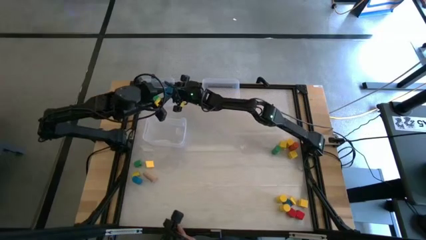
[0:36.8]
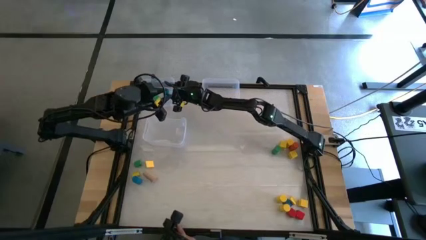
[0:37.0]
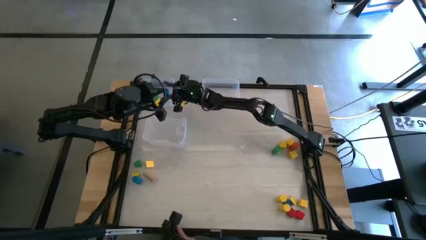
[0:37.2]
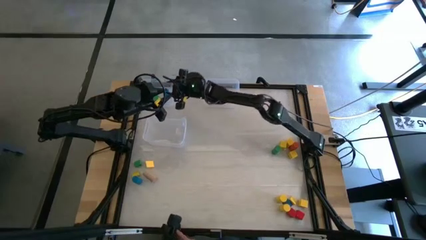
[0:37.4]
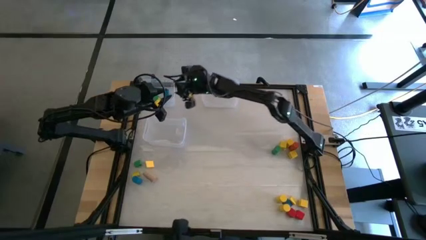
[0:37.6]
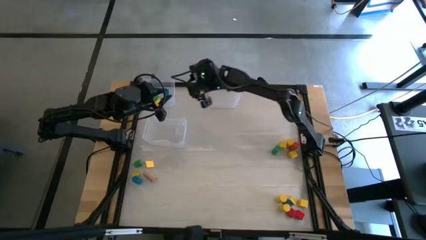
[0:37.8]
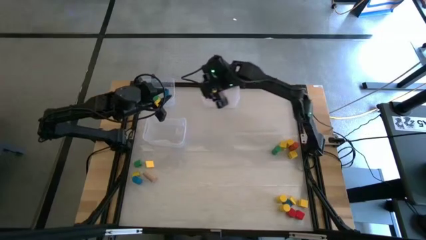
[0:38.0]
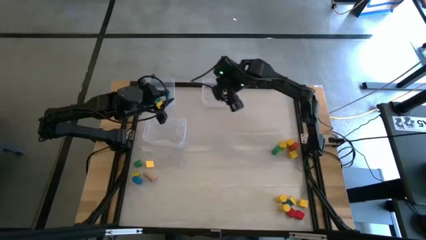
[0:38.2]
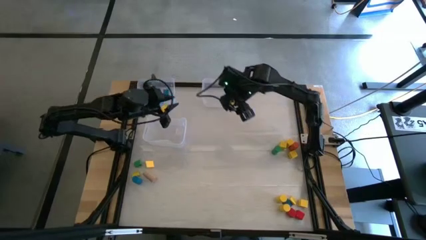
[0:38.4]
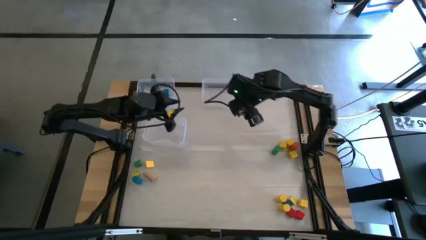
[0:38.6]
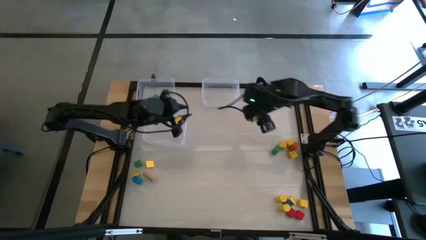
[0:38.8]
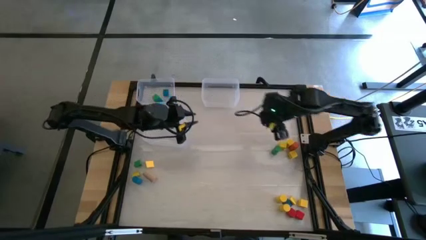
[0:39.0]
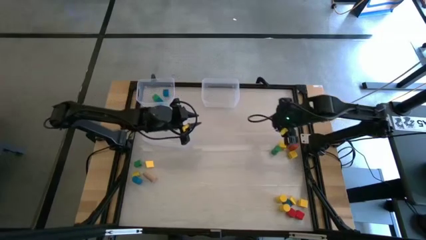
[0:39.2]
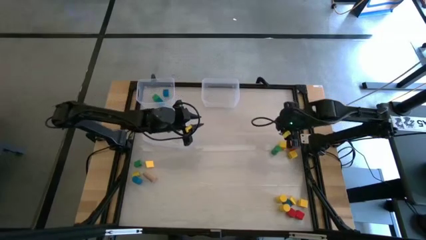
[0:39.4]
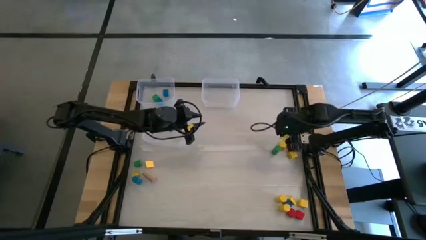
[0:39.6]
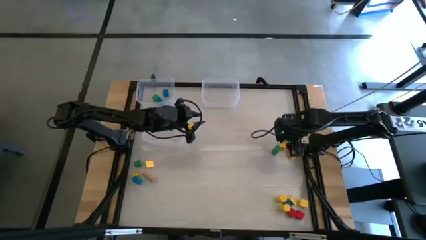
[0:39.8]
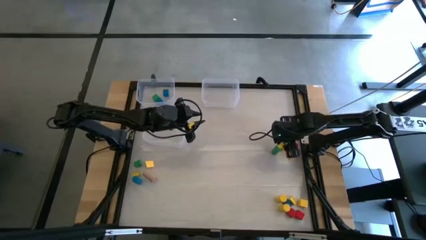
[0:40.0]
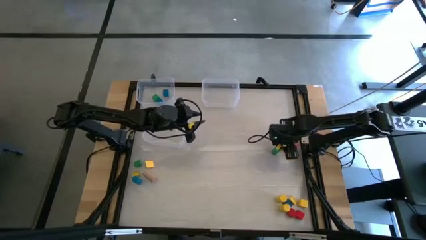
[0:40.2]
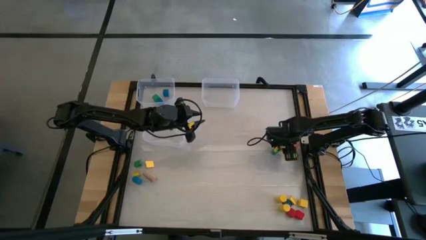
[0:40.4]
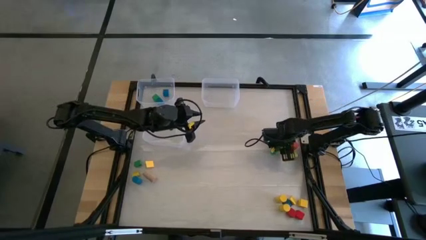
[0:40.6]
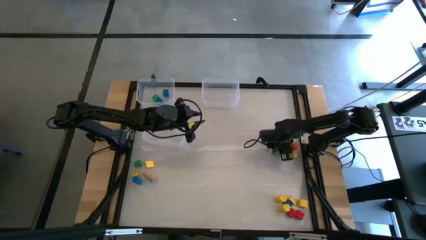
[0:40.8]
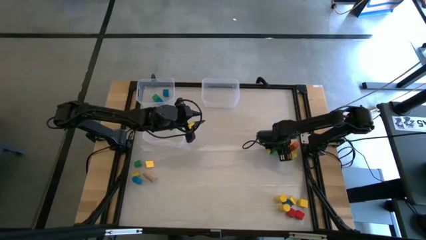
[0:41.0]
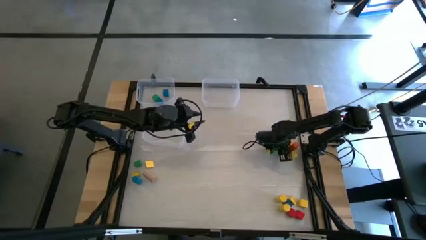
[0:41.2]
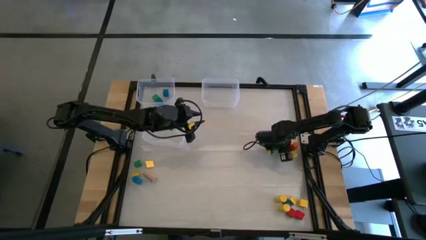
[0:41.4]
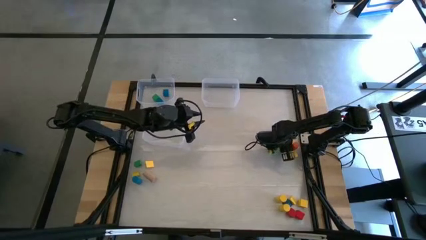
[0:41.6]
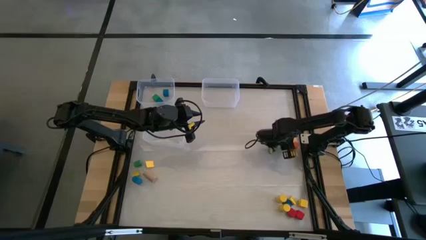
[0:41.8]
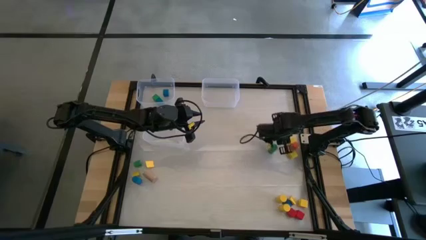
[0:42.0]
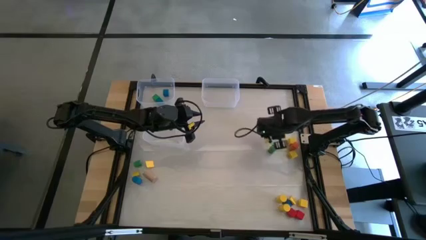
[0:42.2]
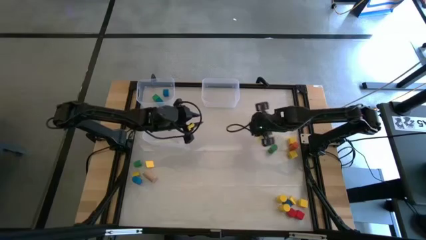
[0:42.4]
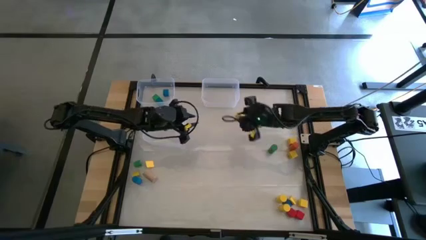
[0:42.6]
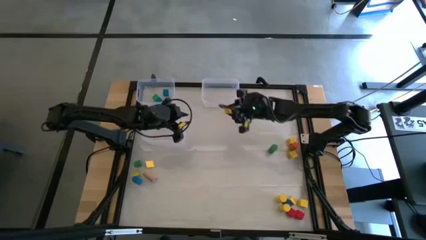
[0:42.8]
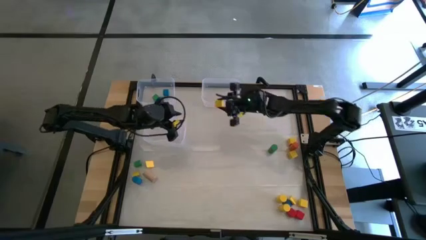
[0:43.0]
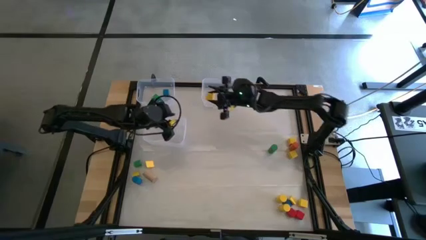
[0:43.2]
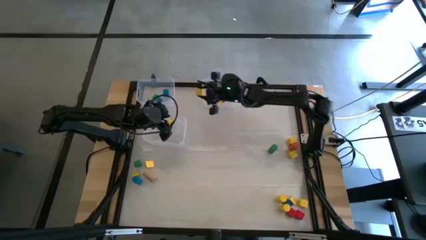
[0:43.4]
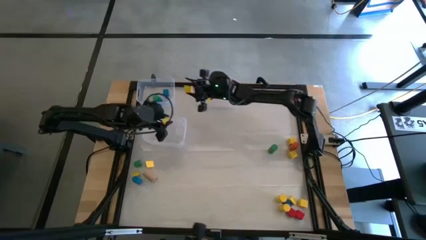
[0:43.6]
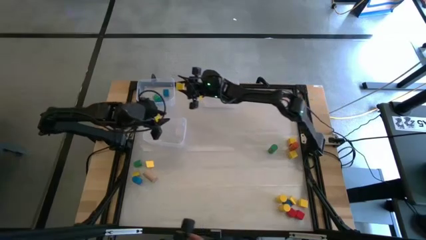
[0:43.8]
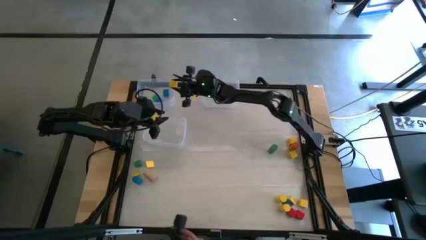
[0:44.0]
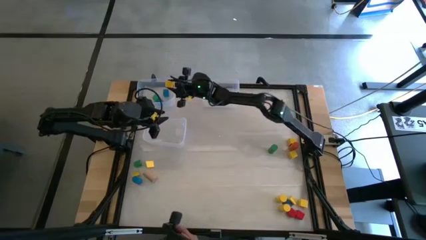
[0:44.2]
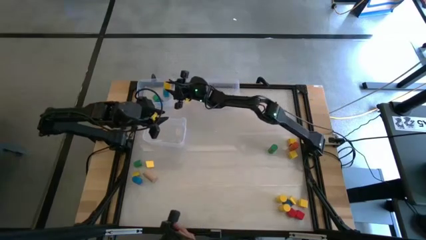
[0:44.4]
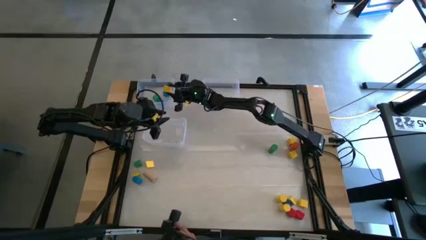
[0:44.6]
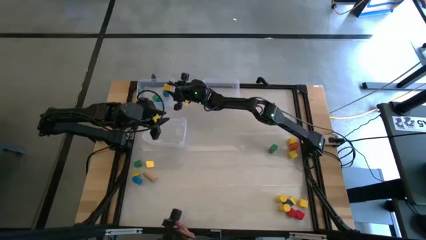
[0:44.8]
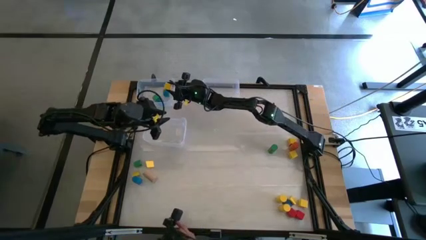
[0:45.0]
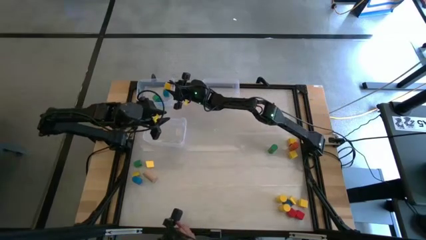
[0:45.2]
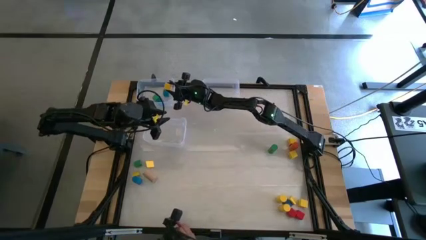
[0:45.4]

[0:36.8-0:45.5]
Task: Sort blocks by size
Put the yellow square game block into the top left transparent bin

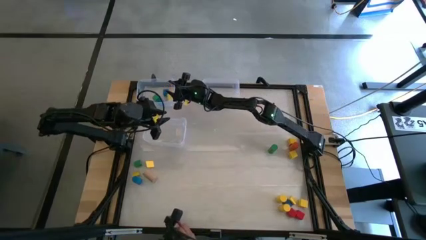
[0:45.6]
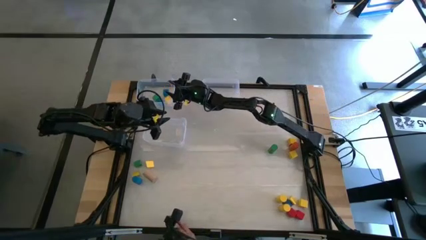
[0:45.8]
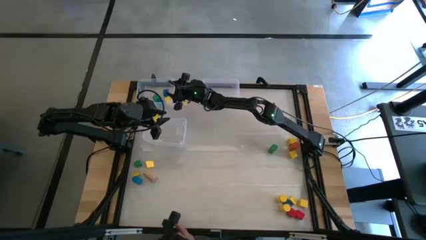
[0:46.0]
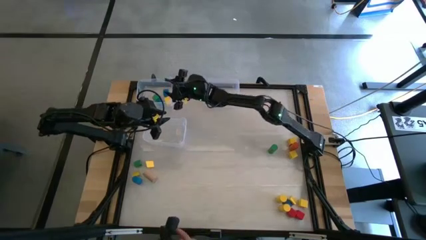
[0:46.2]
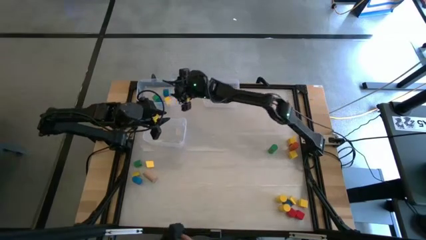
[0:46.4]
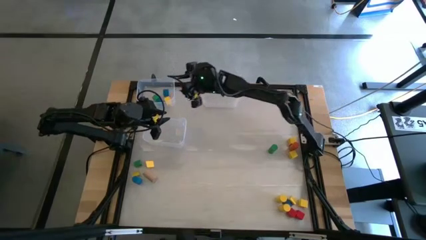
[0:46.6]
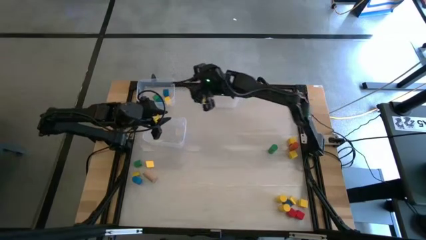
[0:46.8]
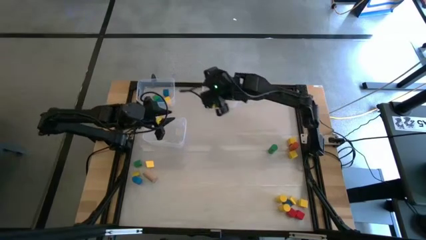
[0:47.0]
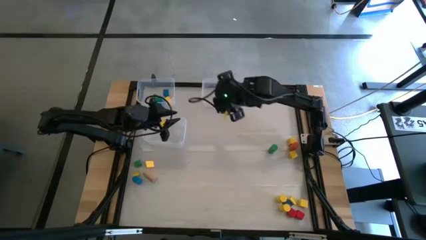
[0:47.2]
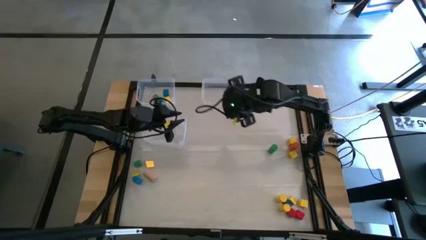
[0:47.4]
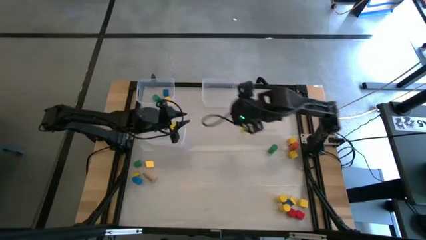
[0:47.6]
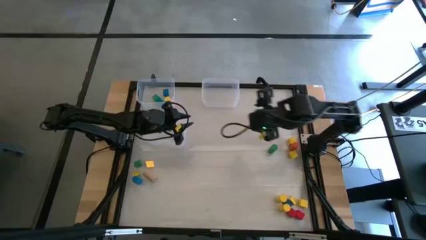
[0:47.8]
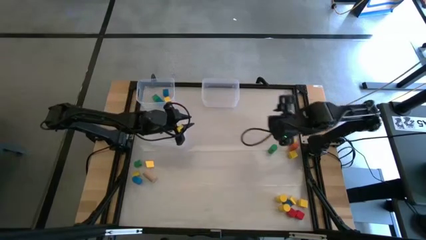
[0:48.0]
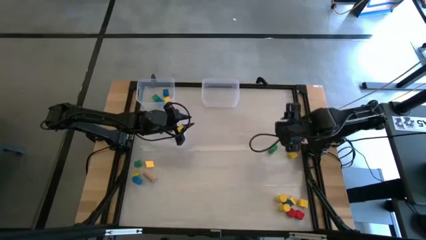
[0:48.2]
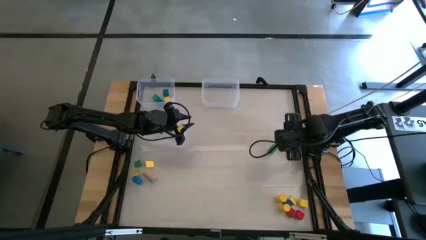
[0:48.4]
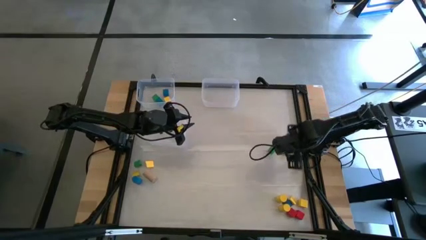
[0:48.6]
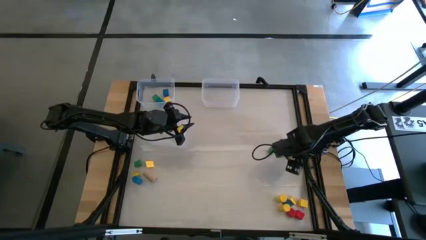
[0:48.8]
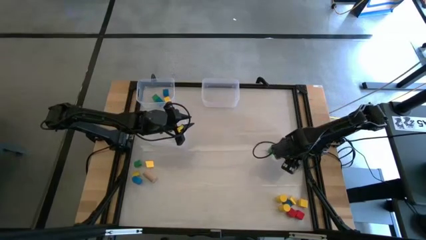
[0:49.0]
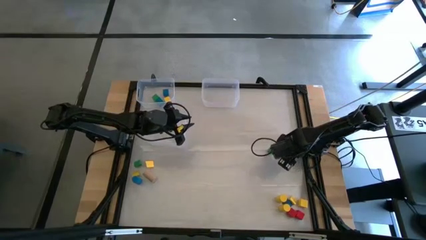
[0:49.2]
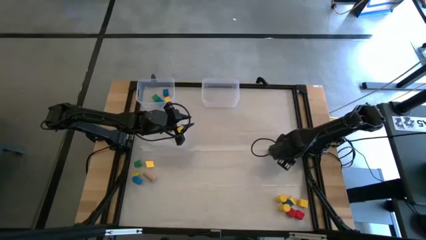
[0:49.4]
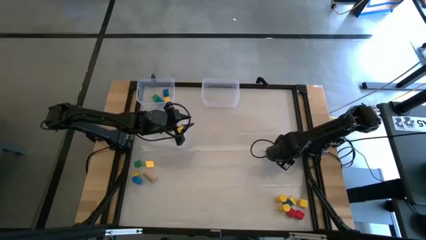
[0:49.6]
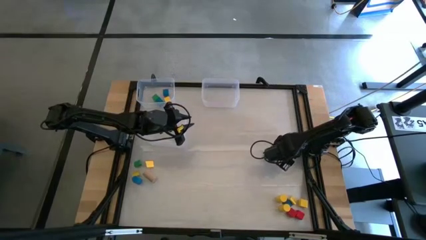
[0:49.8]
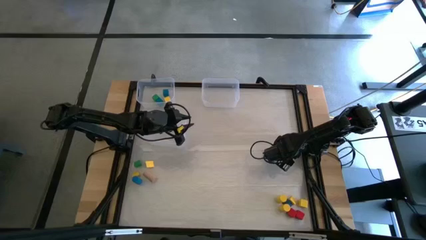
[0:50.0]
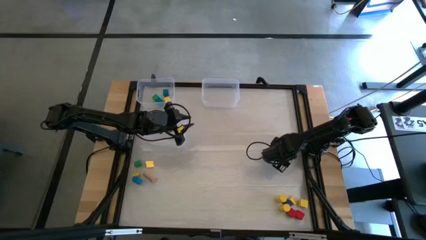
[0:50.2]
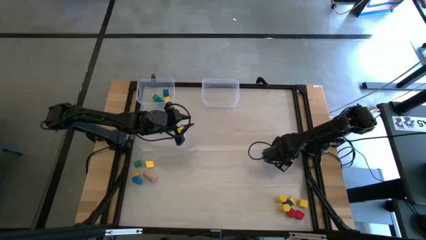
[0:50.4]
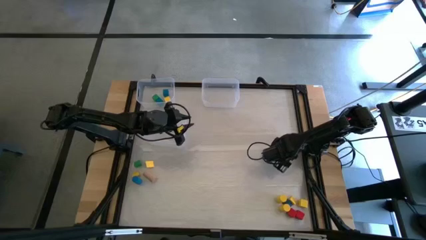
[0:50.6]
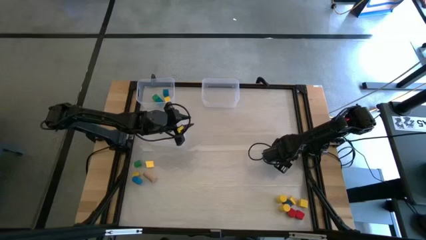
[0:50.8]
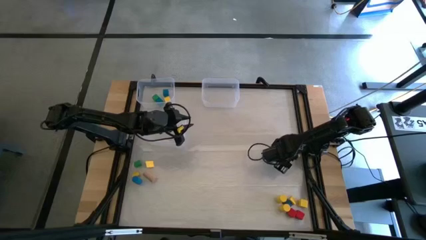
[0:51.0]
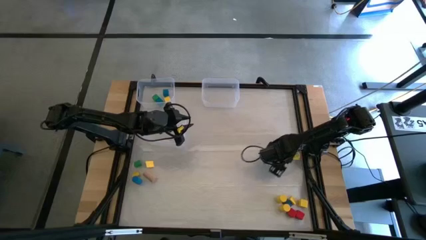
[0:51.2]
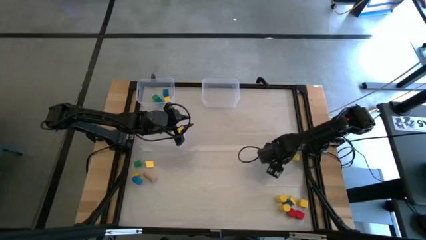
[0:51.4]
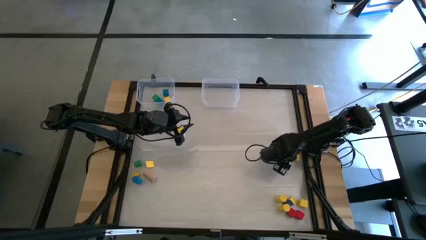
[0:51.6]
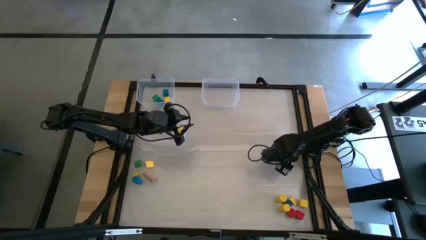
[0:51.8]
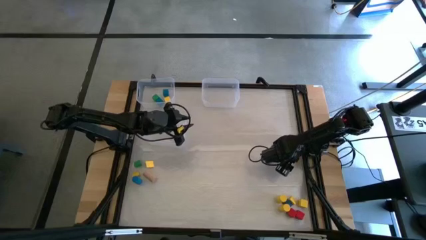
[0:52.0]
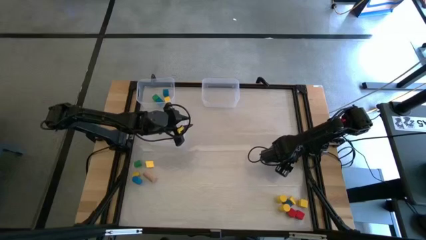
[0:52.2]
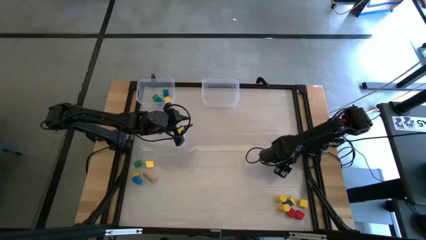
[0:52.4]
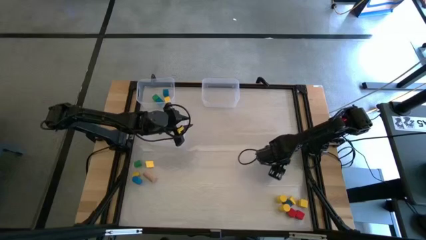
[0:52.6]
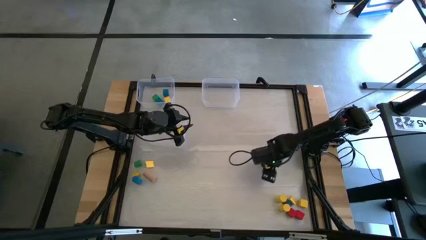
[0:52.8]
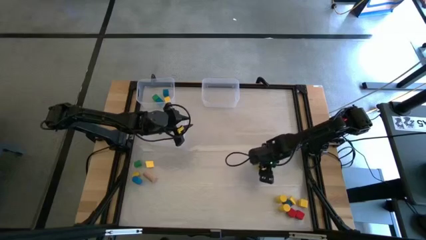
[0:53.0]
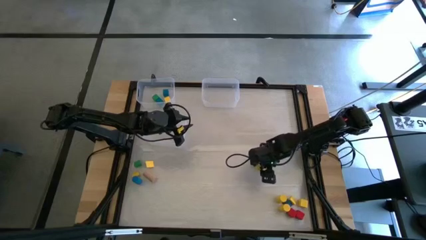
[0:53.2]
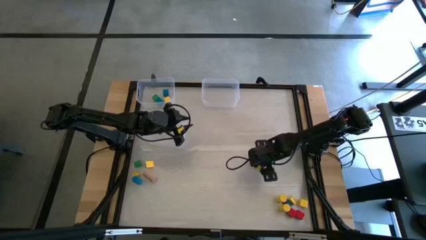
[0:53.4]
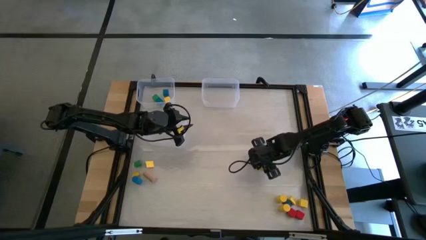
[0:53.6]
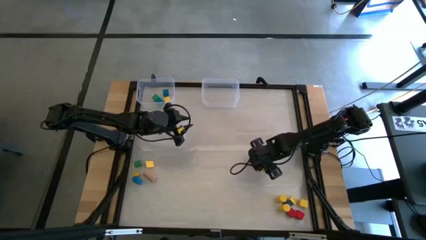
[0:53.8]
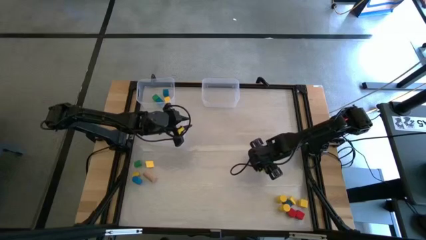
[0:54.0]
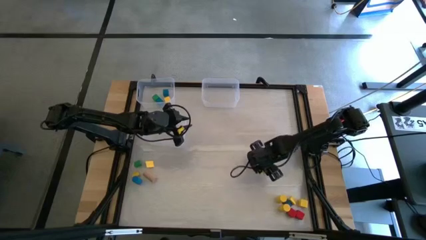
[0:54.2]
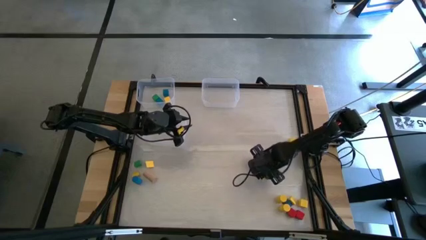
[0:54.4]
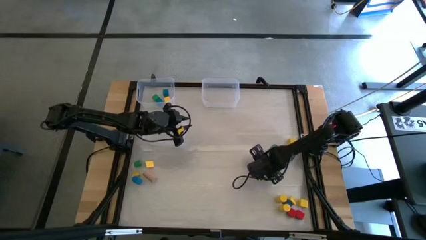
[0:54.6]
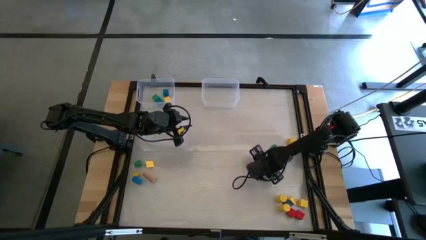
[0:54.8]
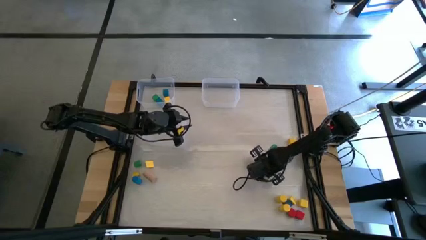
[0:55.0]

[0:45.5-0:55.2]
Put the yellow square game block into the top left transparent bin
